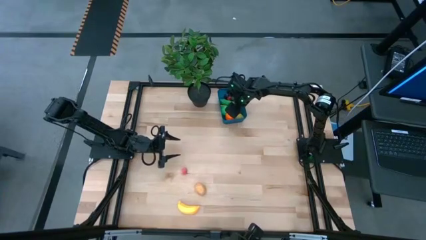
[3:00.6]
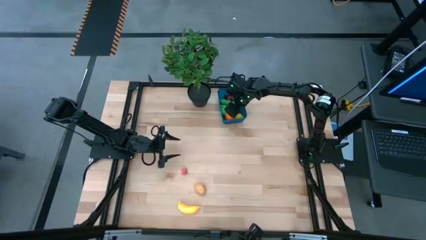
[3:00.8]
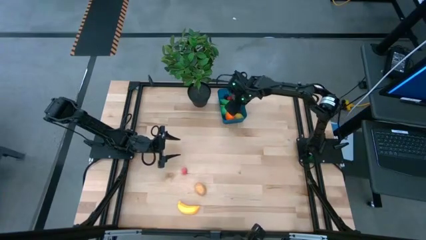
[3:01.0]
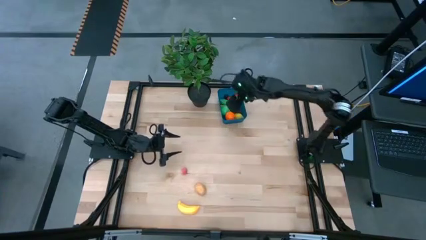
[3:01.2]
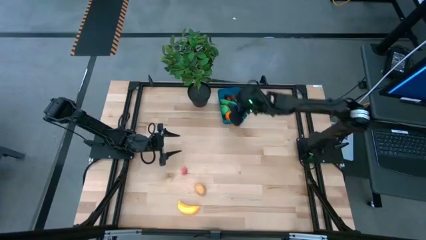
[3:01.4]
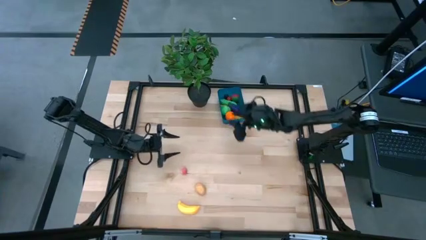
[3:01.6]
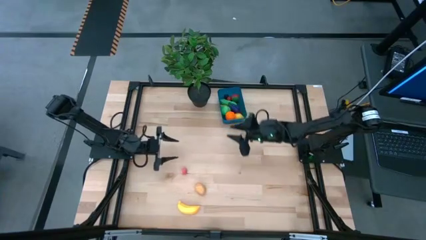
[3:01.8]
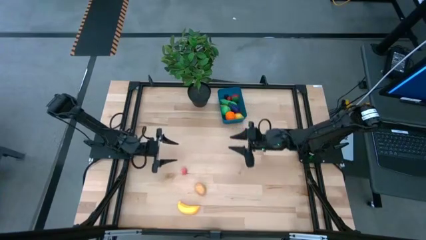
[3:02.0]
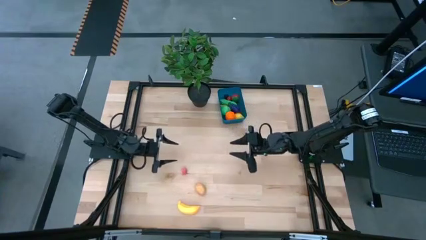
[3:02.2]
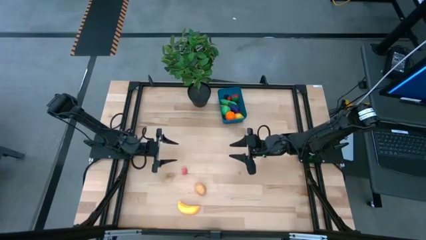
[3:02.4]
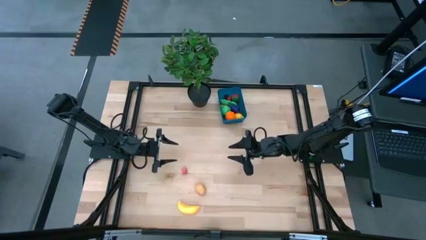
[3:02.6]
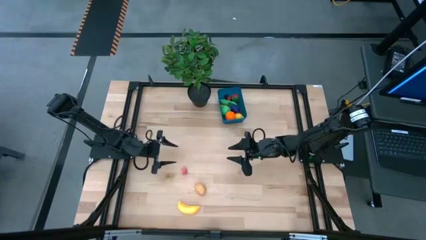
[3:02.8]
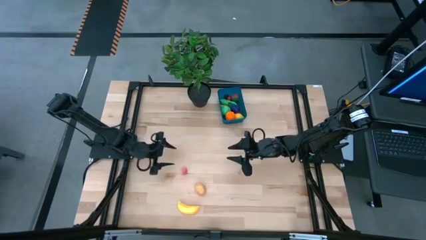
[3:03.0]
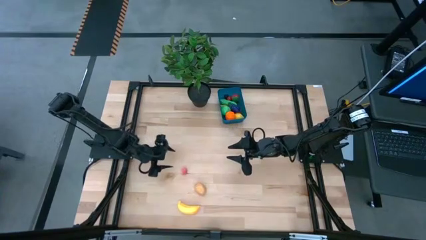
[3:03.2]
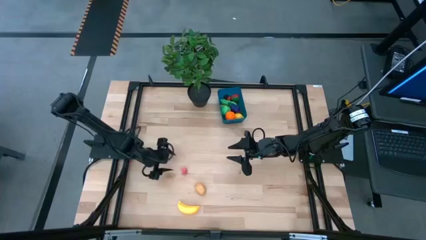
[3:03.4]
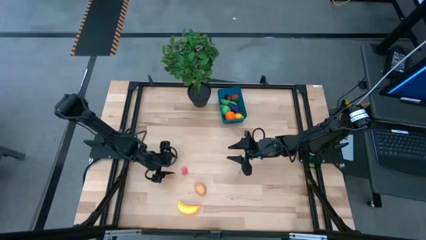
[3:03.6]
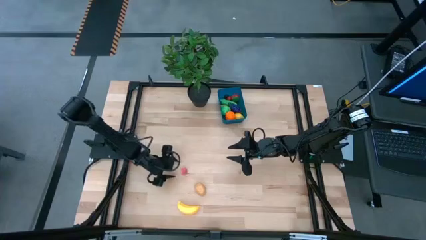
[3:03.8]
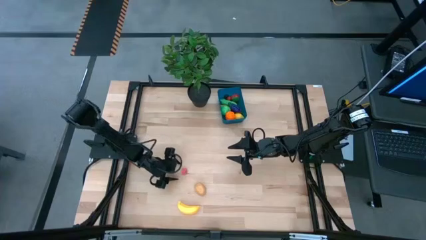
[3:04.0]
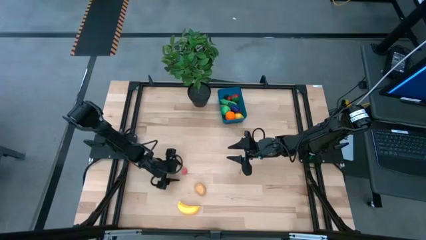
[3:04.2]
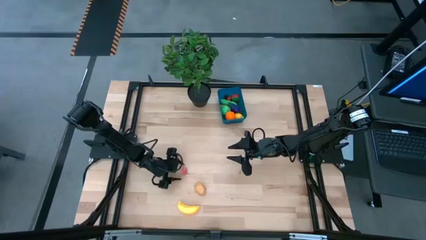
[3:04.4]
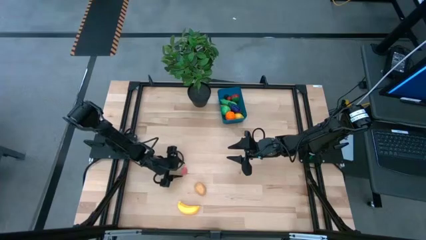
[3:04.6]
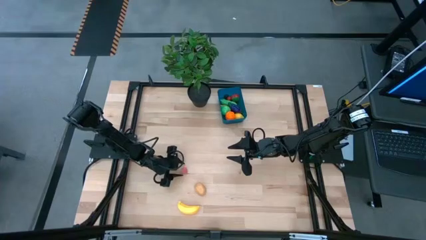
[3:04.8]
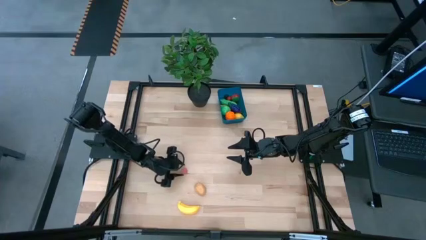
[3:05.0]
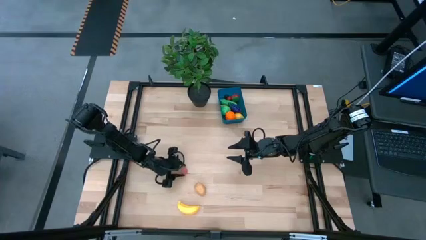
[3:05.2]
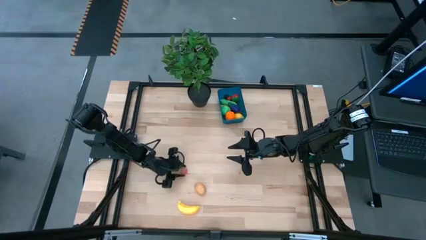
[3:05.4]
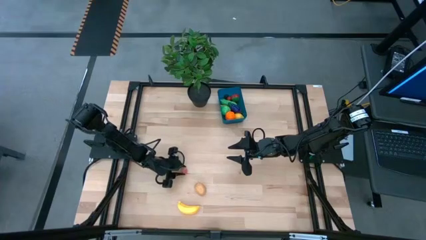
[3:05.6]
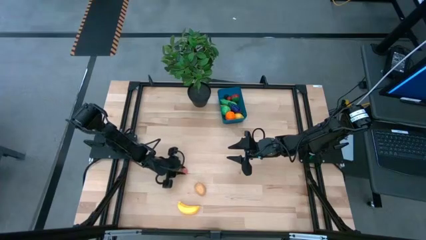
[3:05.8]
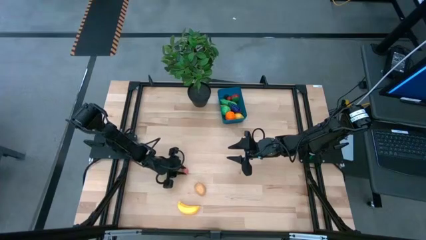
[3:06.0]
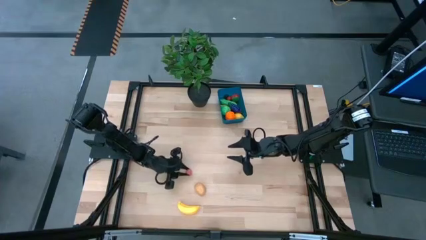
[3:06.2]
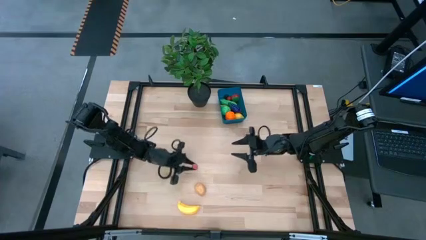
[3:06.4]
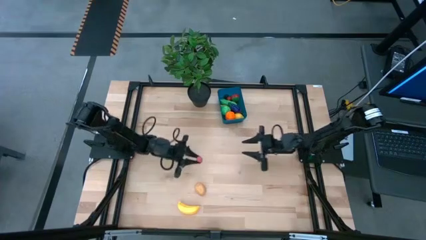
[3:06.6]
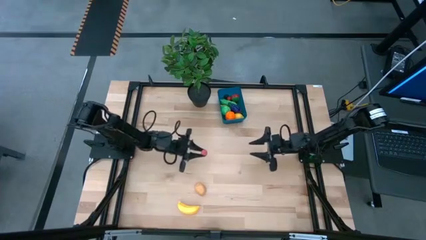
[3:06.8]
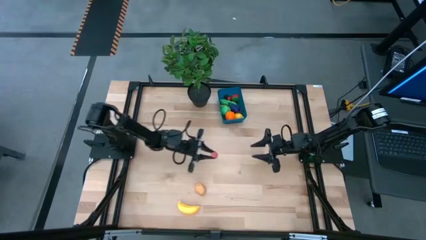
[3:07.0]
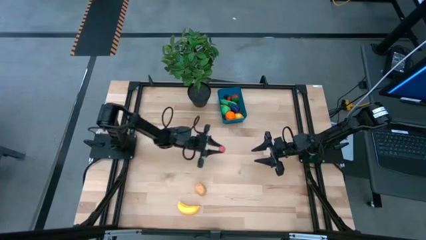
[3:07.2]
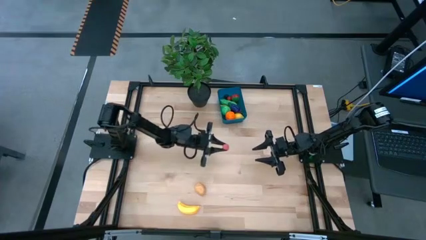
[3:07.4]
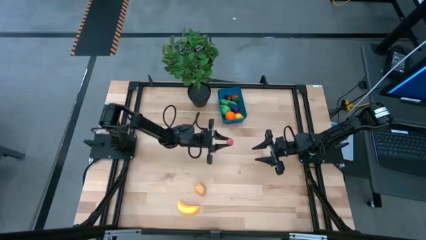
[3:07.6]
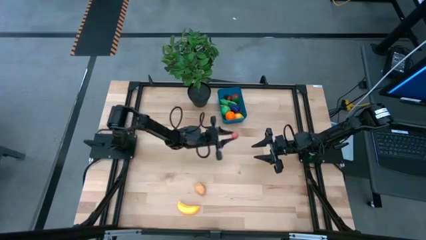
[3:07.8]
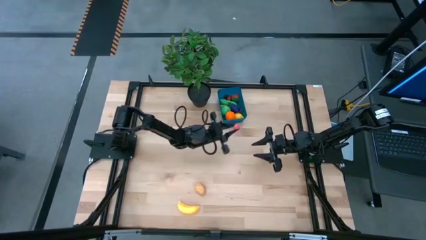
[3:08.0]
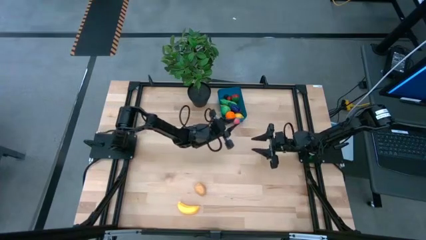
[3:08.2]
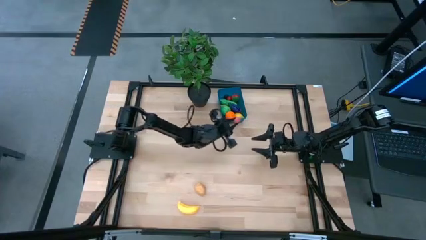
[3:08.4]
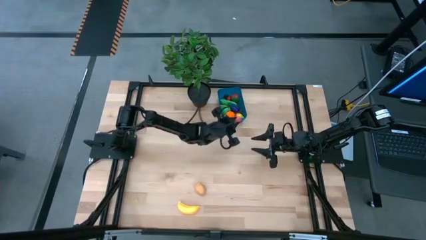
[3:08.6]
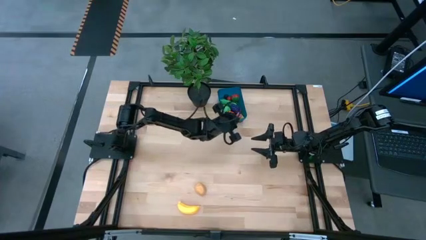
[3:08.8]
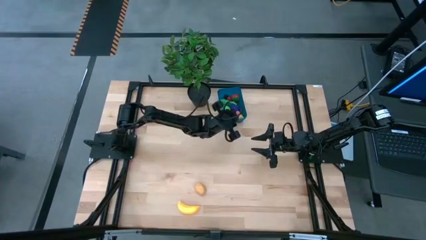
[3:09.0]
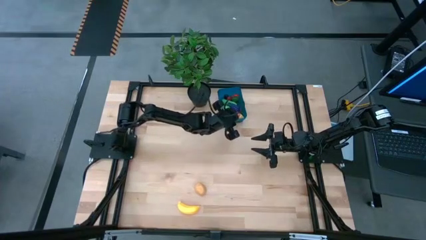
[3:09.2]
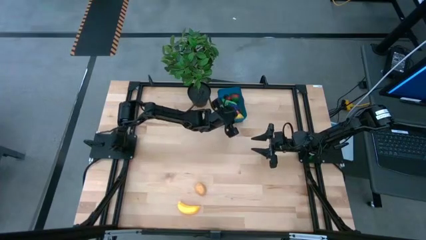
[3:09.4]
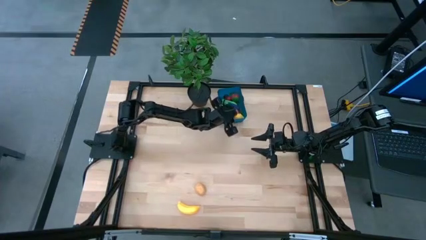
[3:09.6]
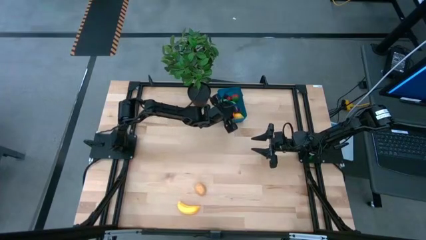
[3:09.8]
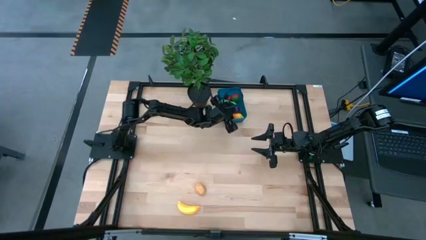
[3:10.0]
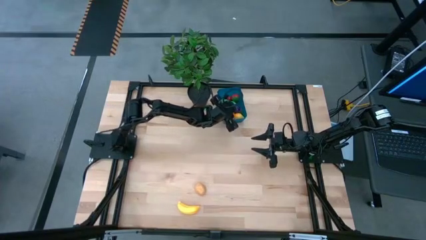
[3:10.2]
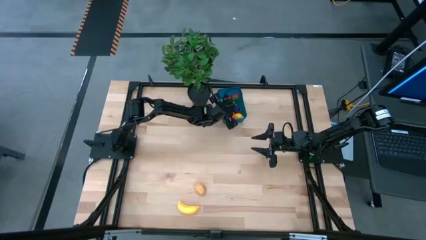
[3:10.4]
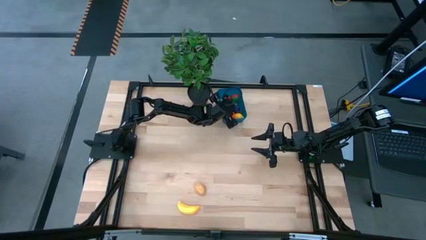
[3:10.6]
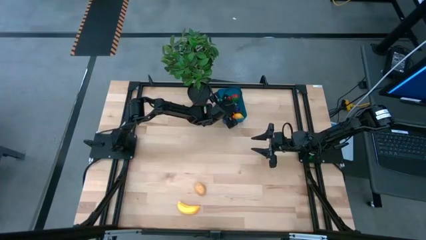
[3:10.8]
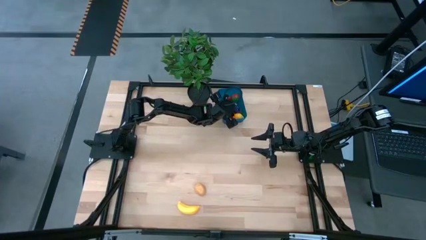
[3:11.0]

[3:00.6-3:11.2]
Task: Pick and placing Produce into tupperware
Put the peach into the blue bin

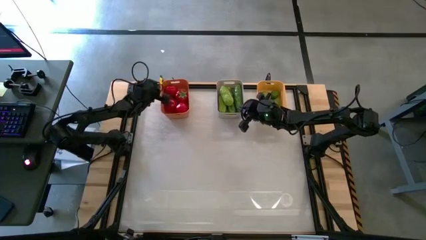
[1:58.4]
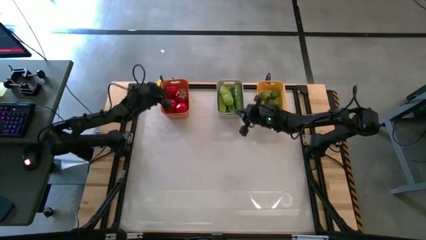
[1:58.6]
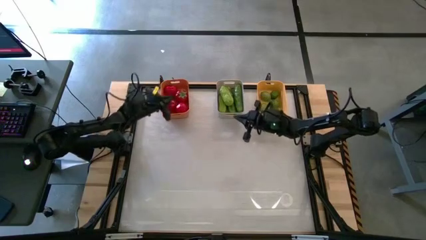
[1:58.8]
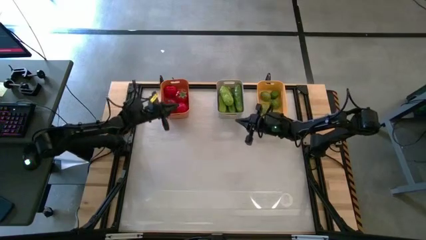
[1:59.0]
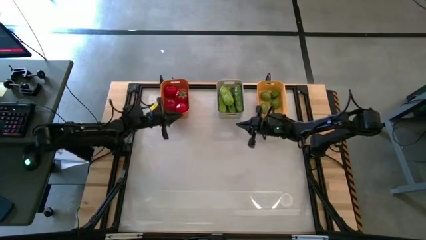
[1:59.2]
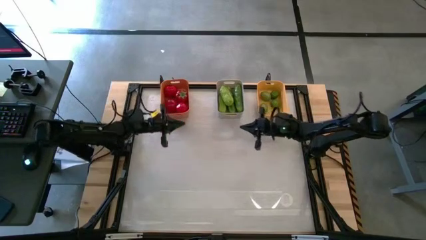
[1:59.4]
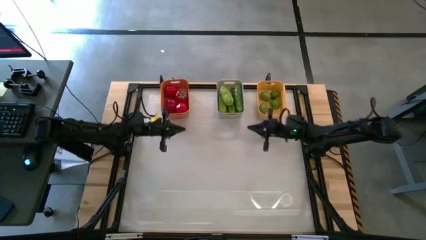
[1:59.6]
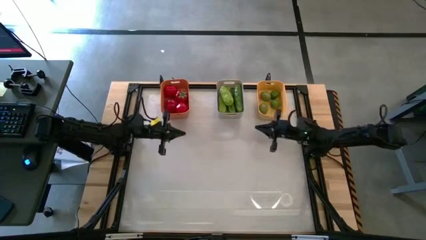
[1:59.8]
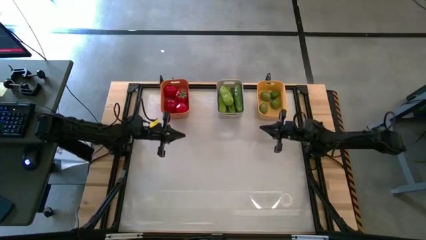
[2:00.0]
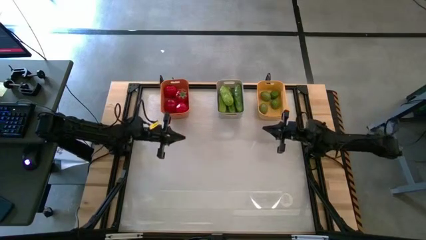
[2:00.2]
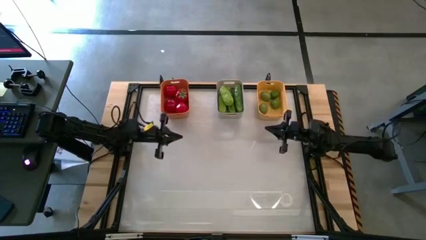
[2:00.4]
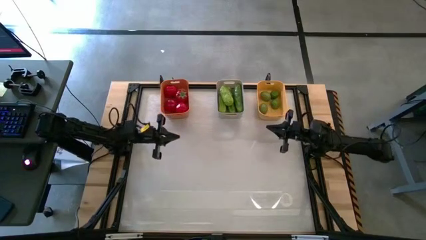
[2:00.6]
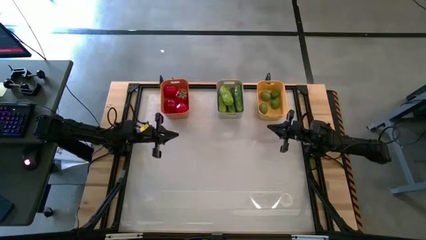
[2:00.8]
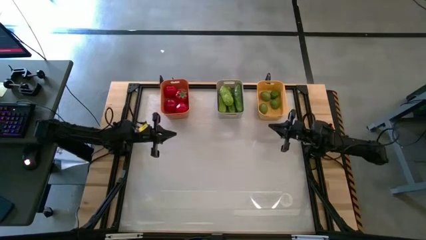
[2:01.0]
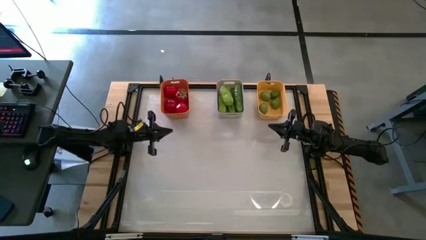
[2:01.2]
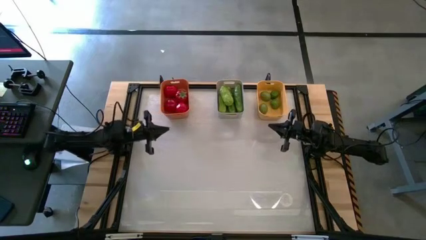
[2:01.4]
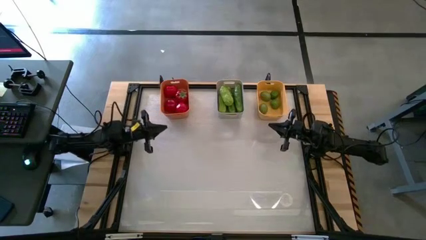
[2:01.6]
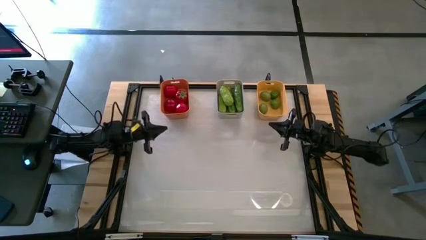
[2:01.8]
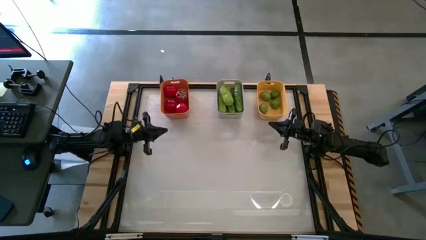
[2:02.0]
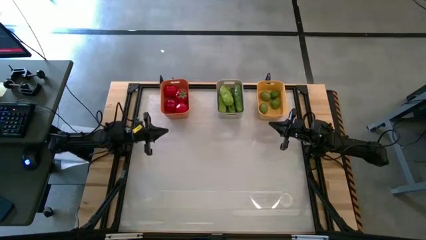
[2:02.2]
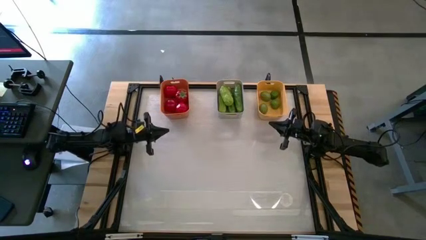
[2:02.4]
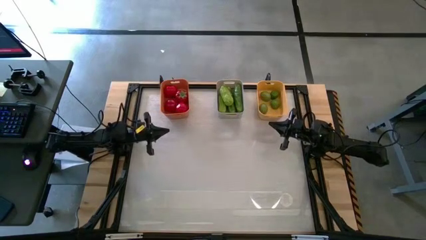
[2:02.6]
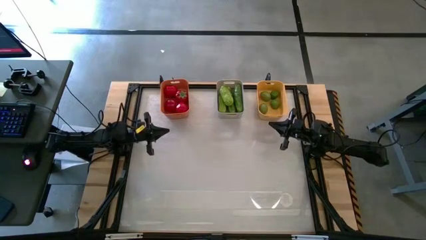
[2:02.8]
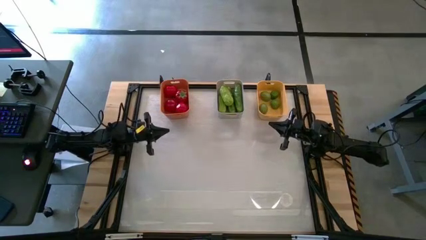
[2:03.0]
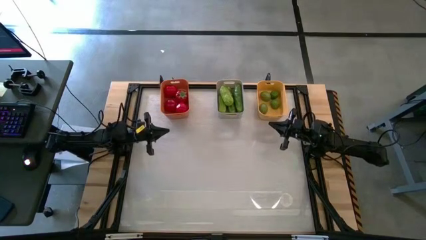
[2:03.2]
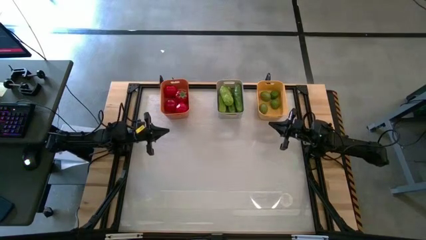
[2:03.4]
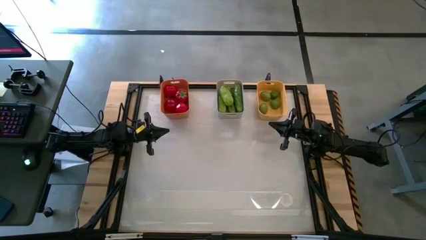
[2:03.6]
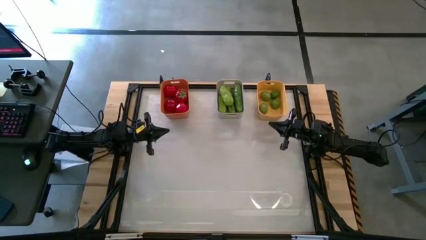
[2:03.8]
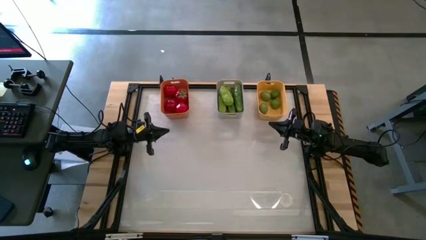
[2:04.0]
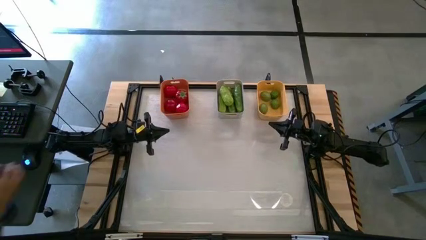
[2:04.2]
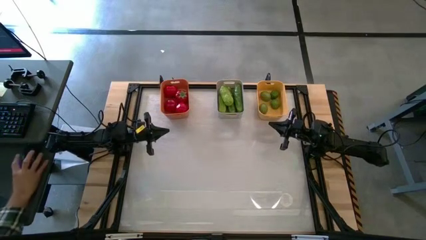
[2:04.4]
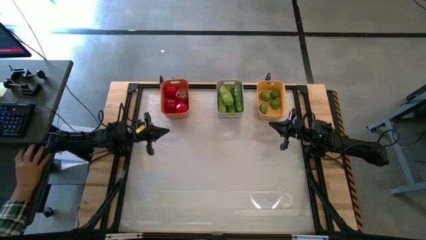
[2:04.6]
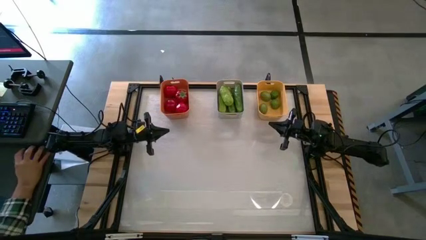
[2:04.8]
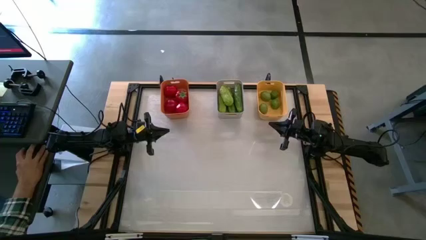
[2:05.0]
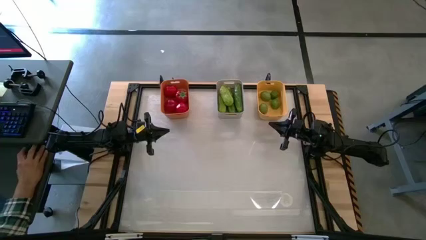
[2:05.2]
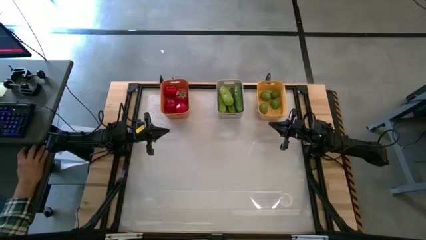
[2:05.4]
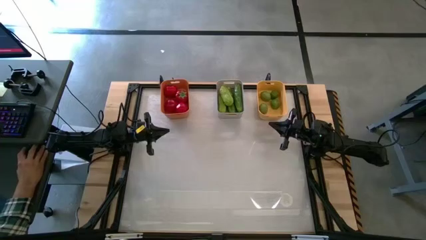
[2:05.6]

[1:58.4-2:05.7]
Task: Sort produce into baskets
Return to Home Position
